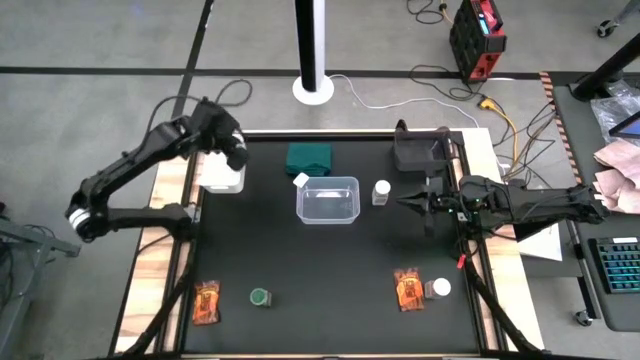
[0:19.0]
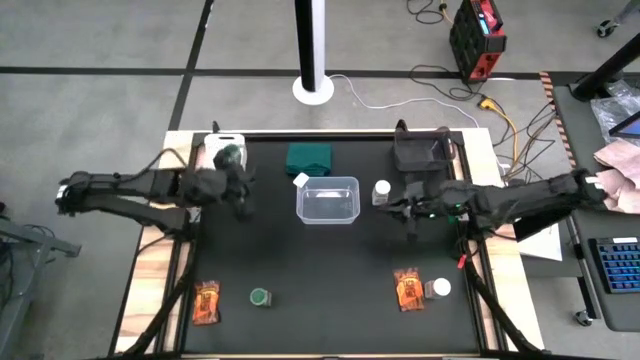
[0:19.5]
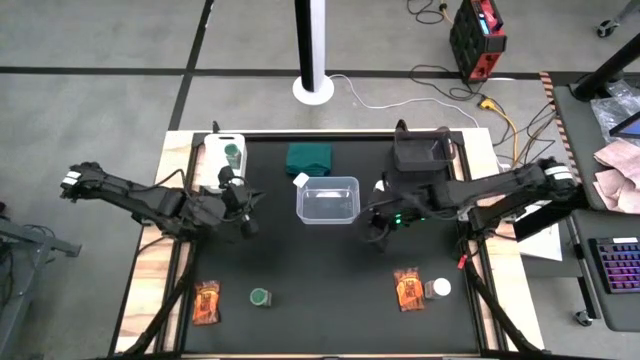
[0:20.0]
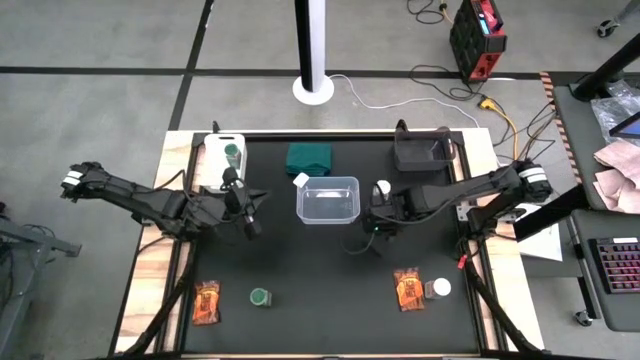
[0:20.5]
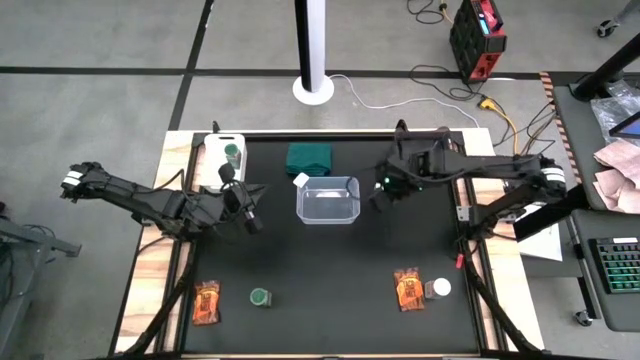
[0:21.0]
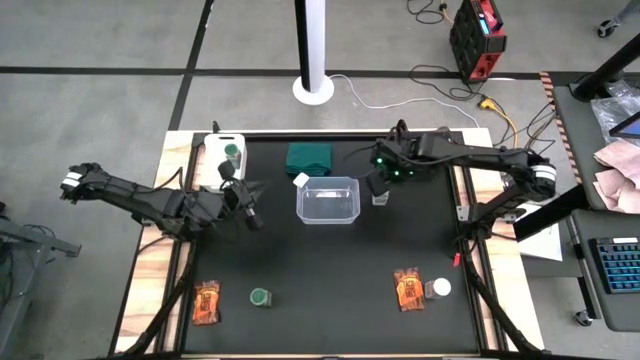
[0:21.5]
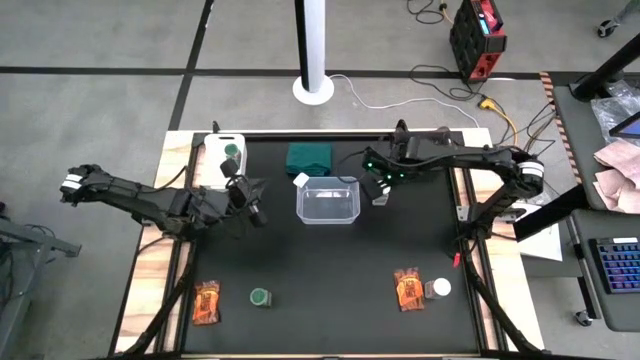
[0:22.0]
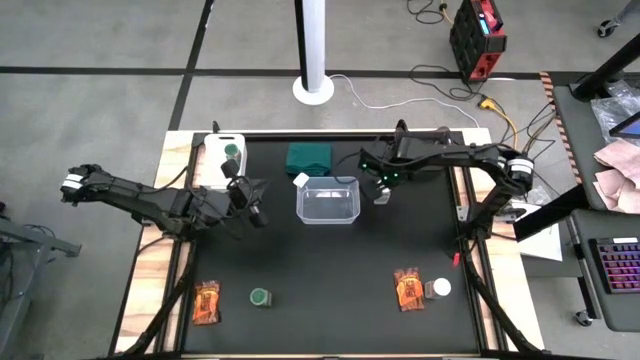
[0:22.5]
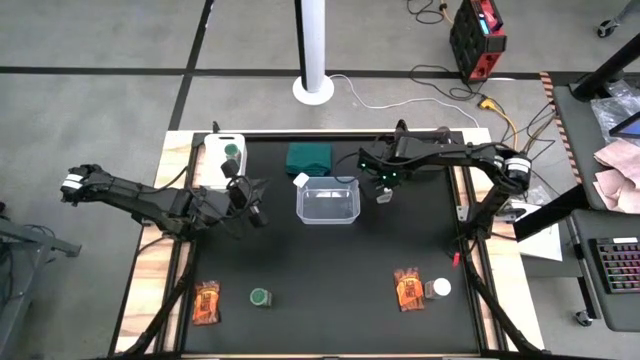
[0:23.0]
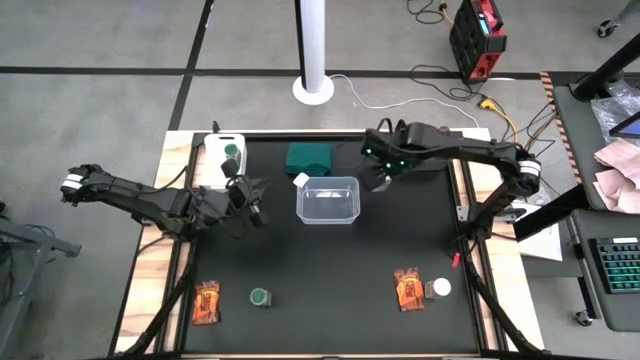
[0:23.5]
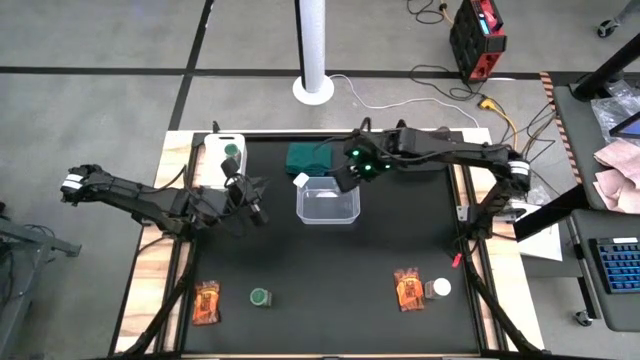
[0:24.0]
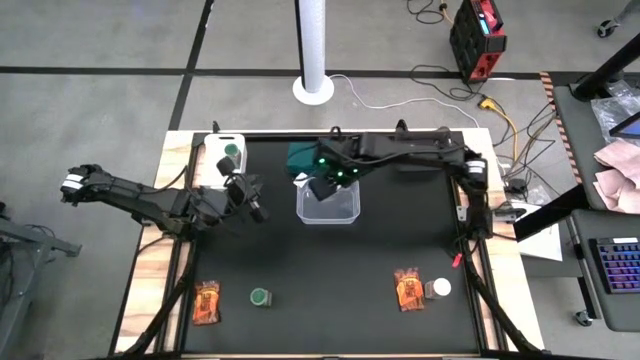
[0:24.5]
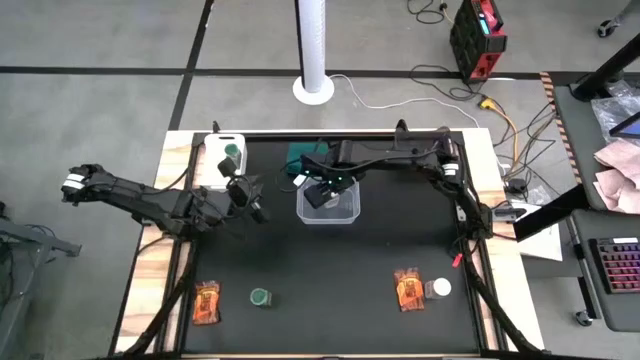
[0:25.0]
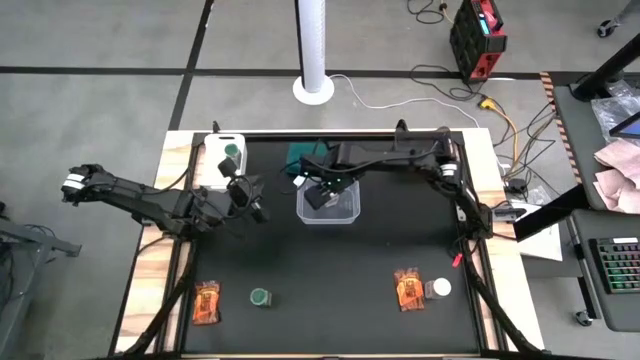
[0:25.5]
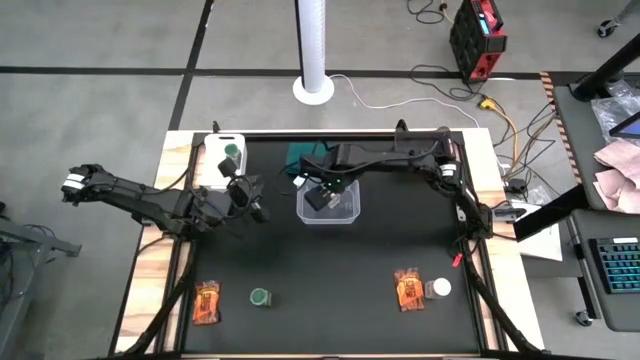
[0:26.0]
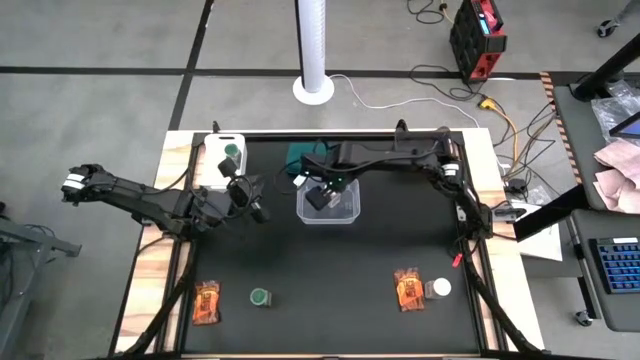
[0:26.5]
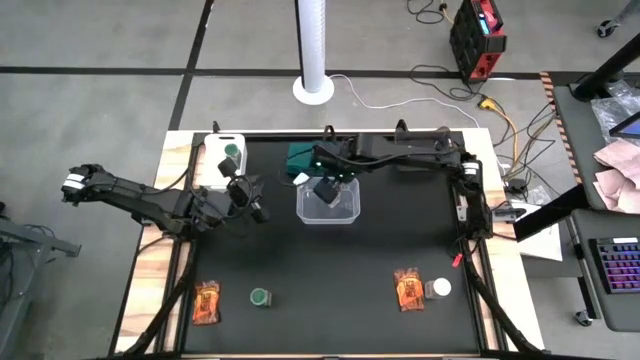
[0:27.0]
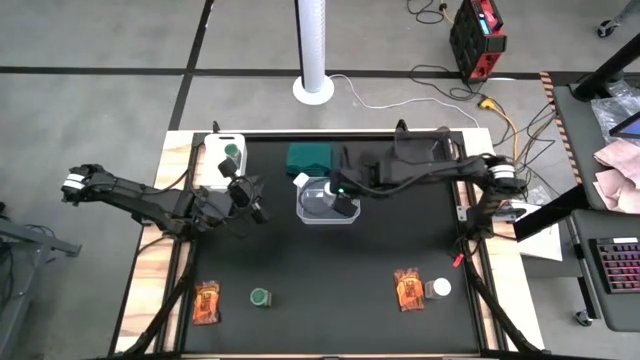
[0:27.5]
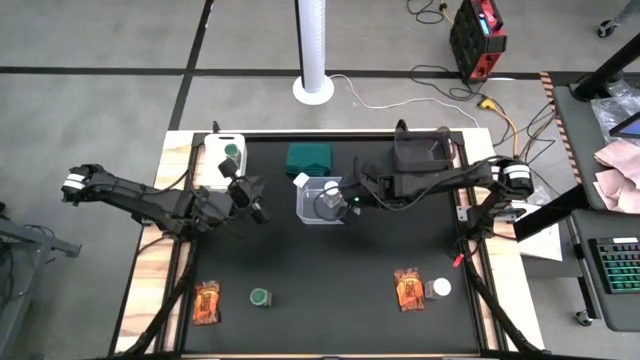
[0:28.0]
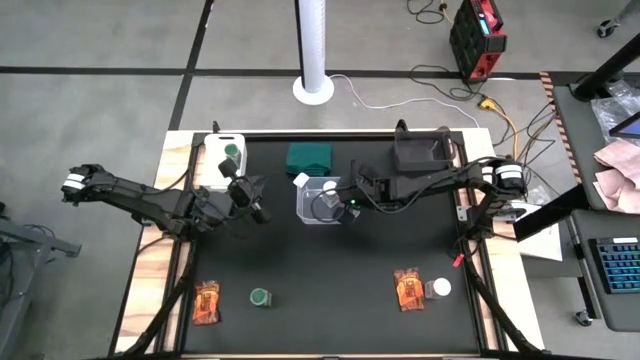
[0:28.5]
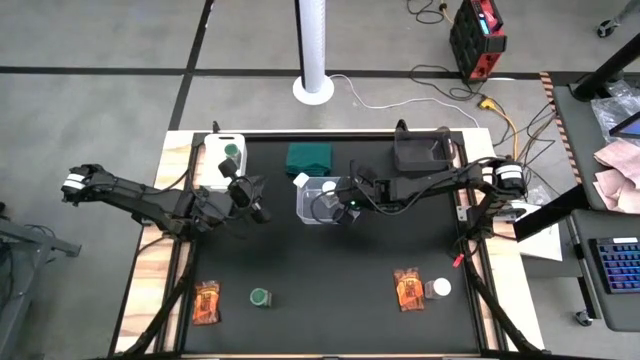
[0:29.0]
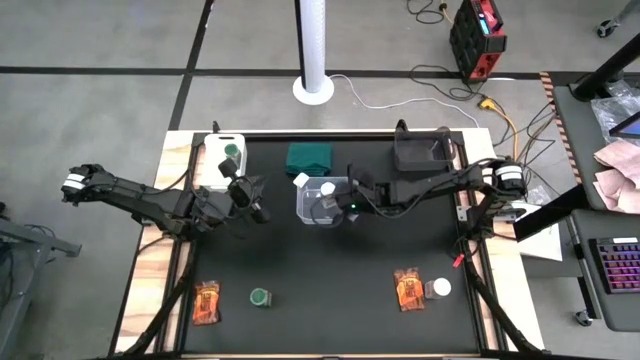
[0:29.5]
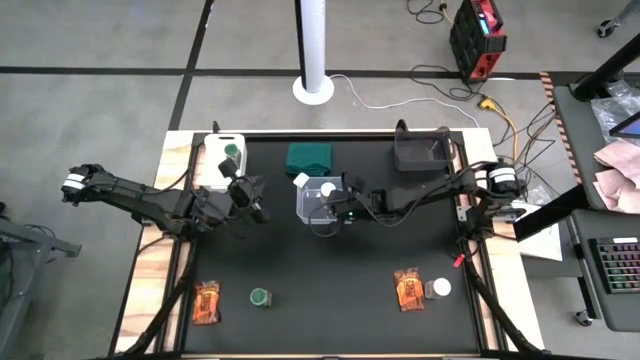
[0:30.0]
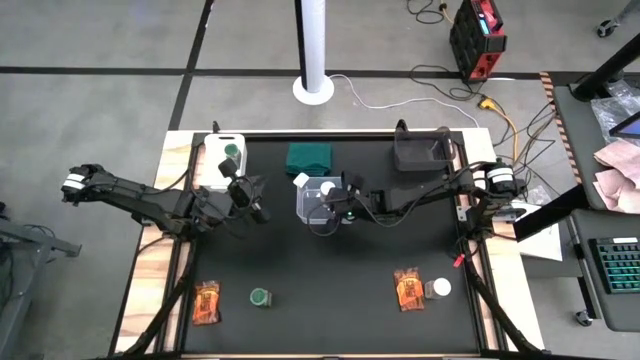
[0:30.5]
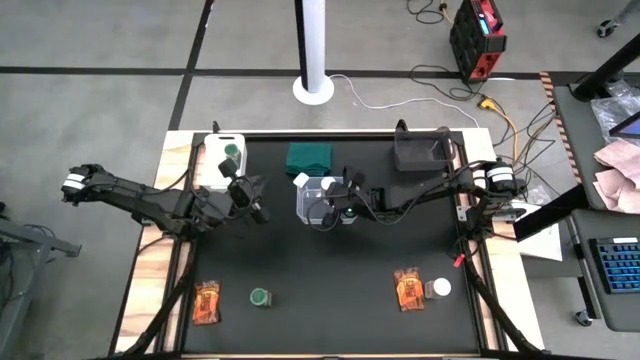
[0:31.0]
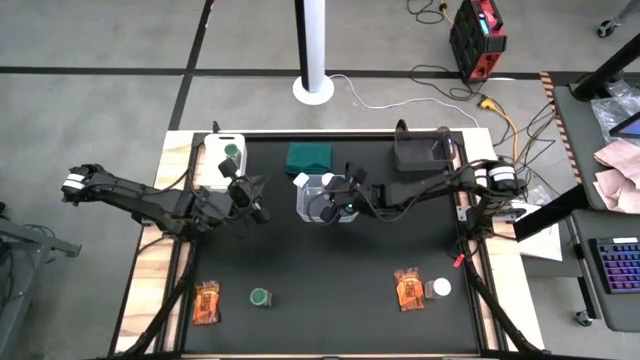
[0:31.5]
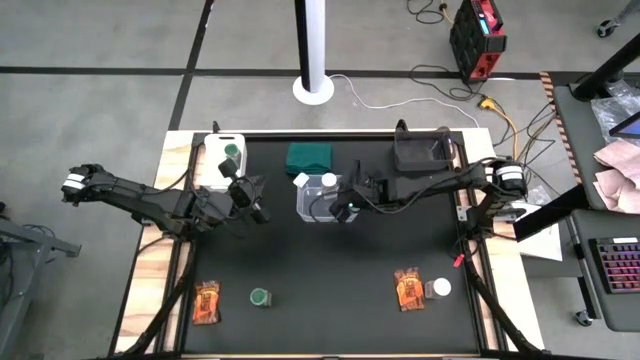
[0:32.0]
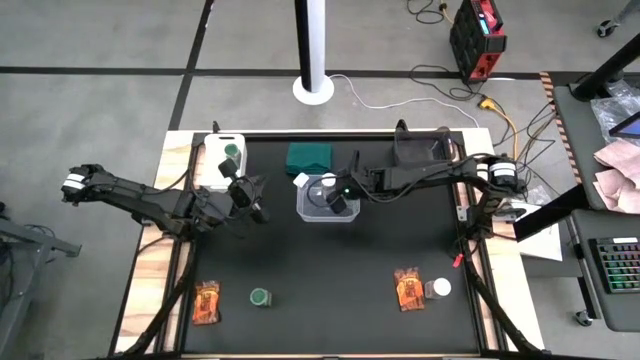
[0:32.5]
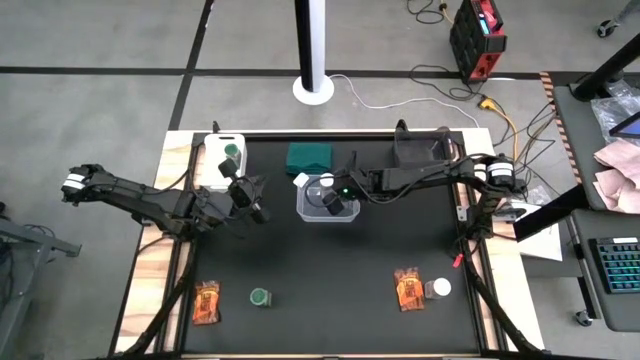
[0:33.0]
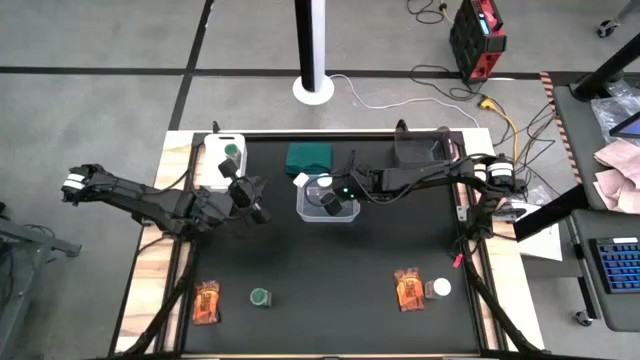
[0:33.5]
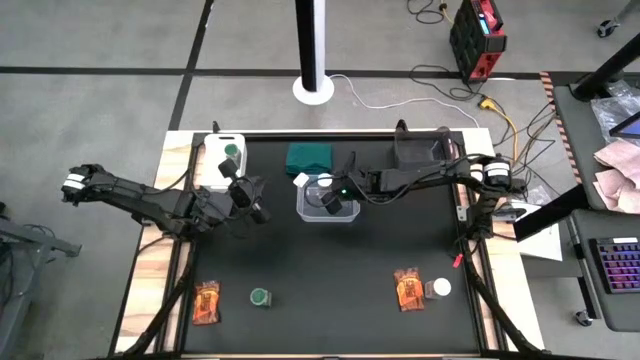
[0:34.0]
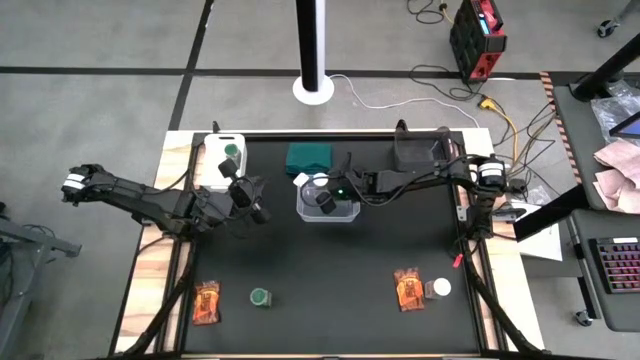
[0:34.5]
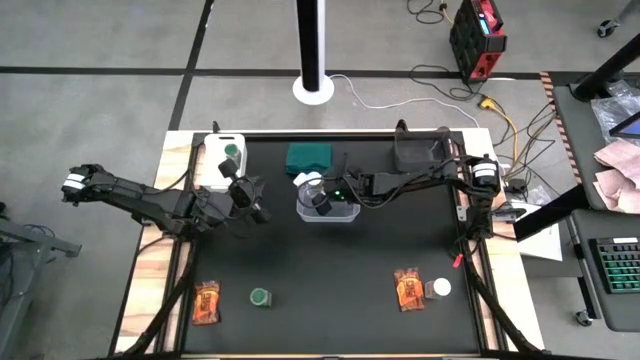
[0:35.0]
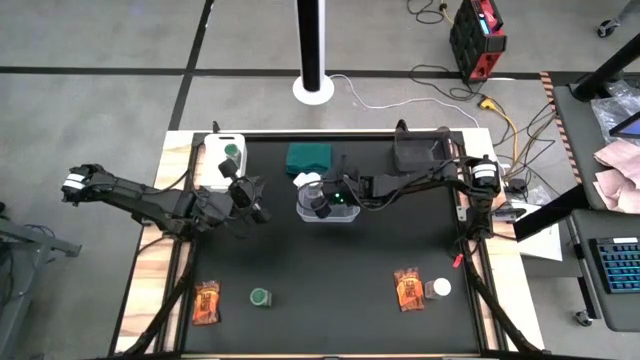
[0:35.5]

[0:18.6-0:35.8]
Task: Sort spices by type
Put the top white spice into the transparent bin

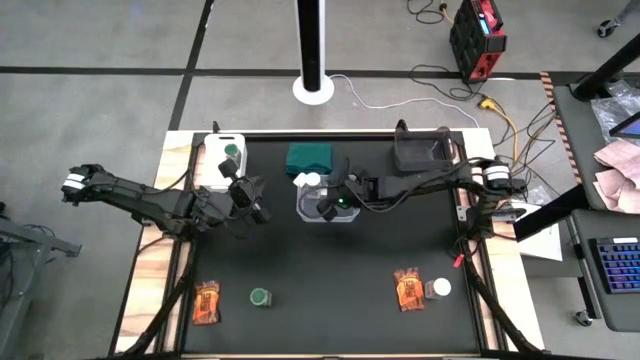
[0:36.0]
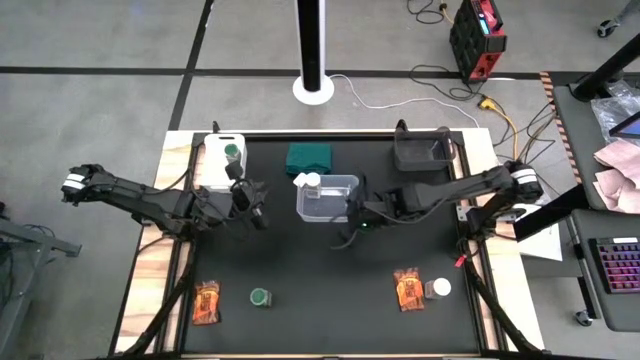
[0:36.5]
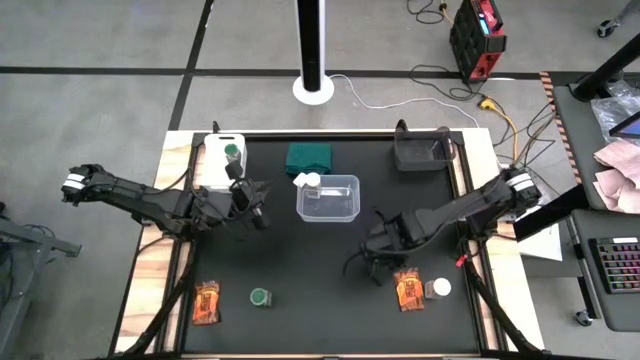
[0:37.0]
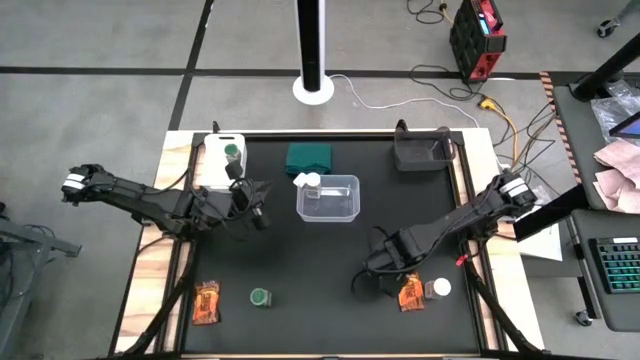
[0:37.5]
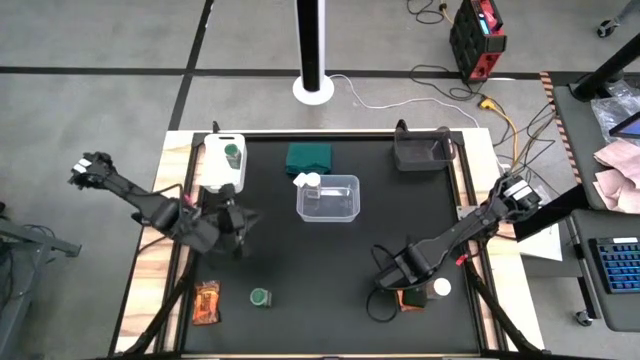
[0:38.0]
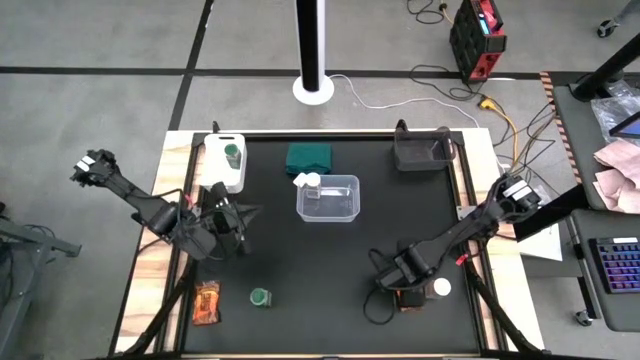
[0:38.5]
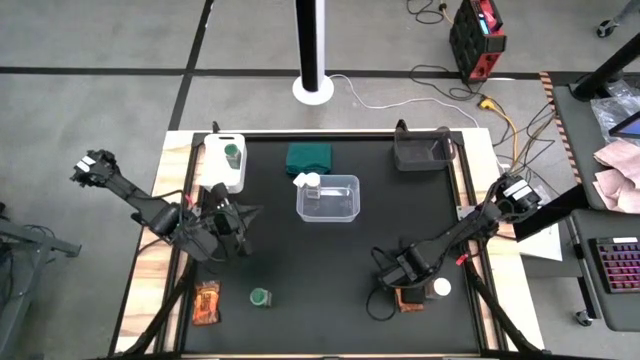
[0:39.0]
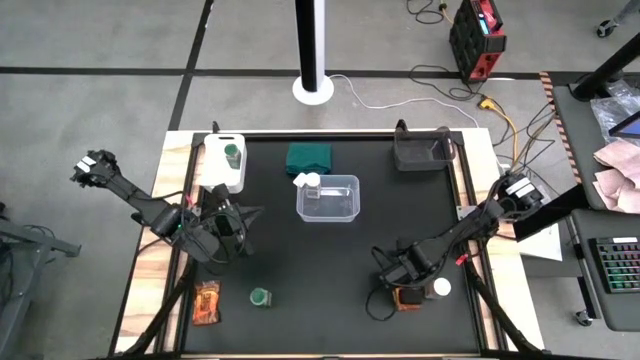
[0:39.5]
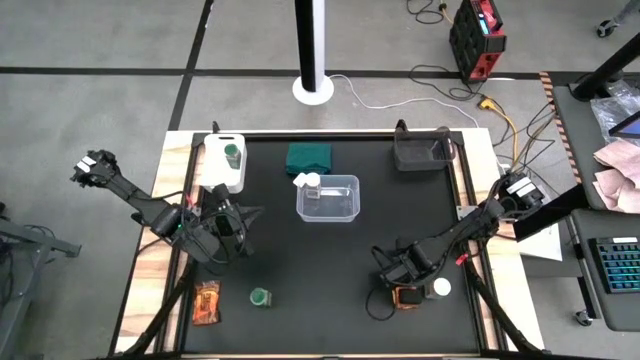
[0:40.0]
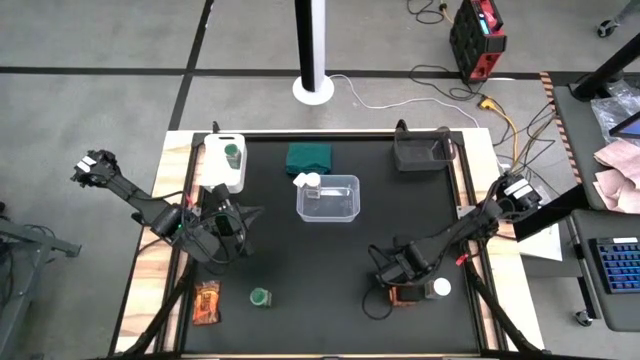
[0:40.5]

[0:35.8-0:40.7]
Put the bottom right spice pack into the black bin

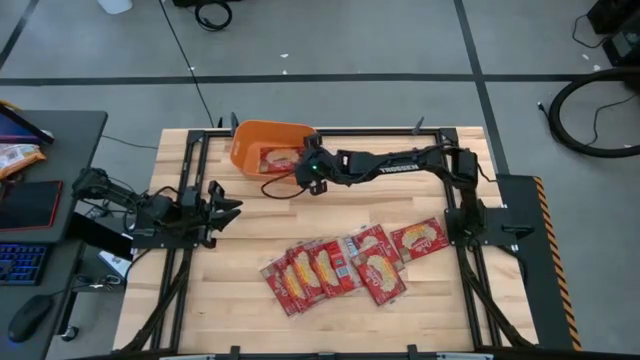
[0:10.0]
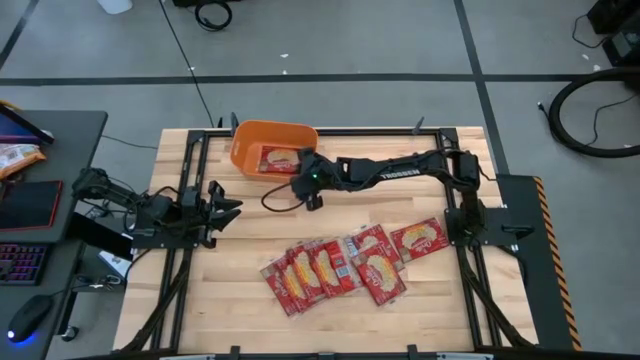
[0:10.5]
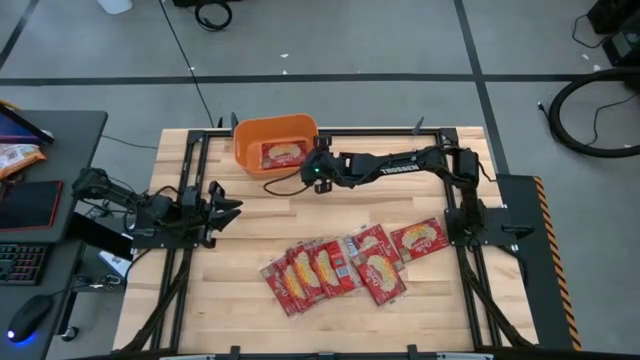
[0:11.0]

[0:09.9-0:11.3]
Task: Sort popcorn bags into baskets
Adjust the orange bin
